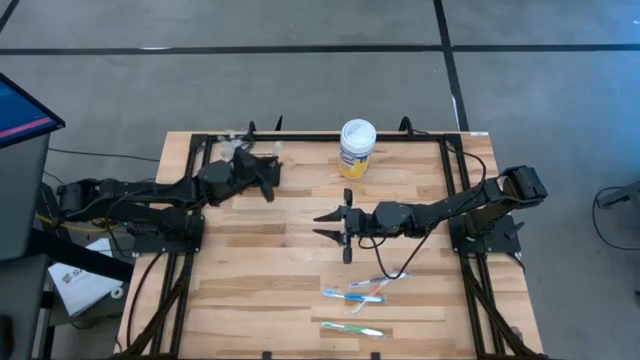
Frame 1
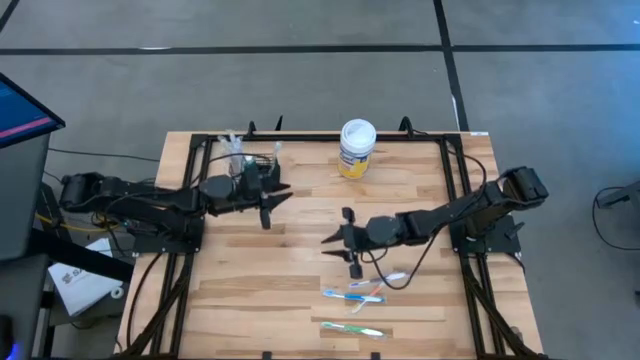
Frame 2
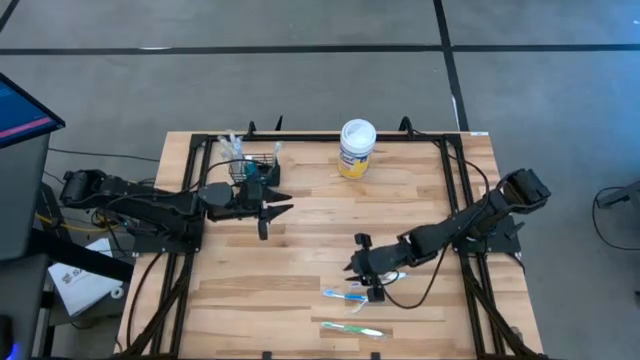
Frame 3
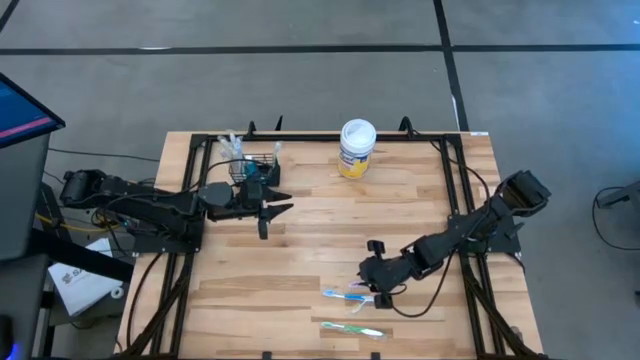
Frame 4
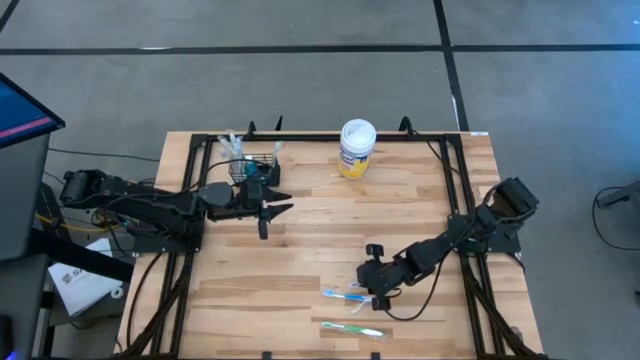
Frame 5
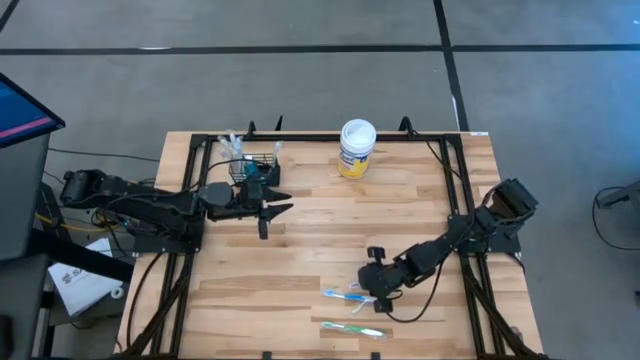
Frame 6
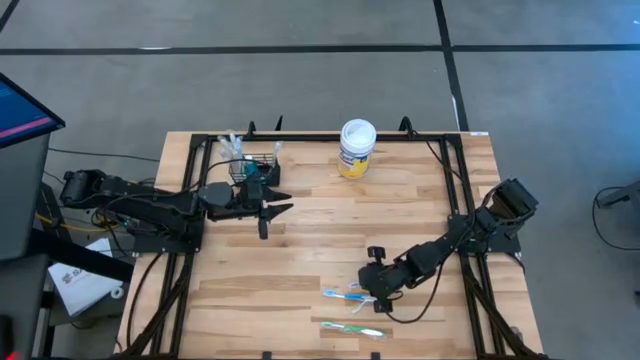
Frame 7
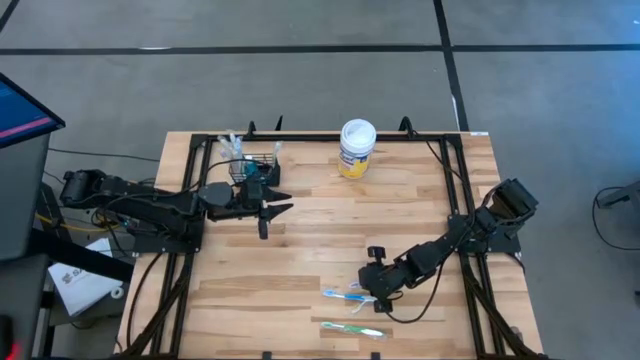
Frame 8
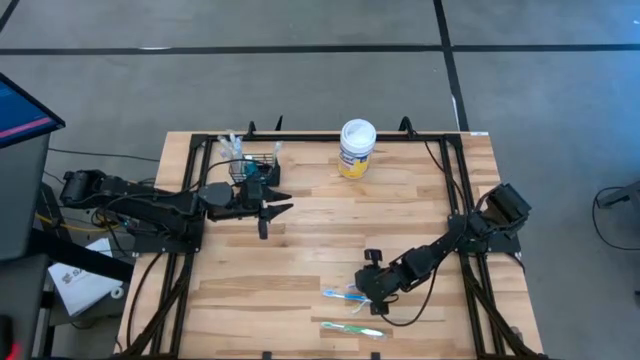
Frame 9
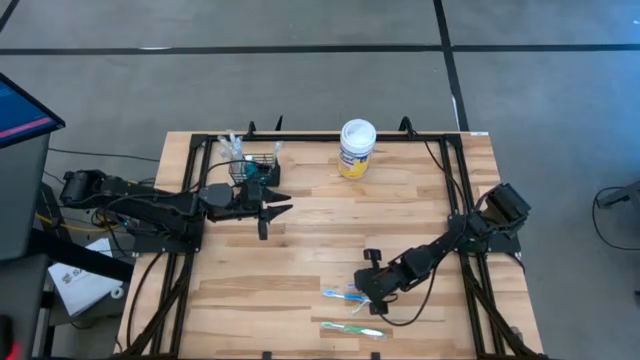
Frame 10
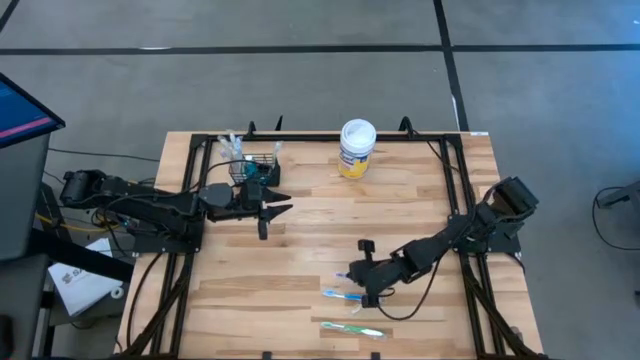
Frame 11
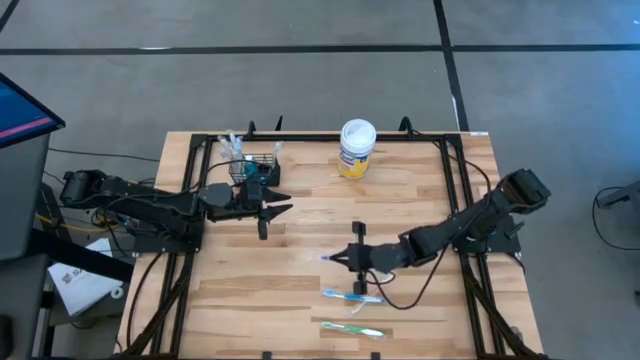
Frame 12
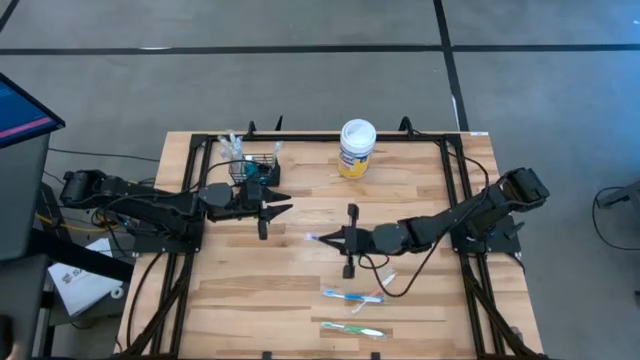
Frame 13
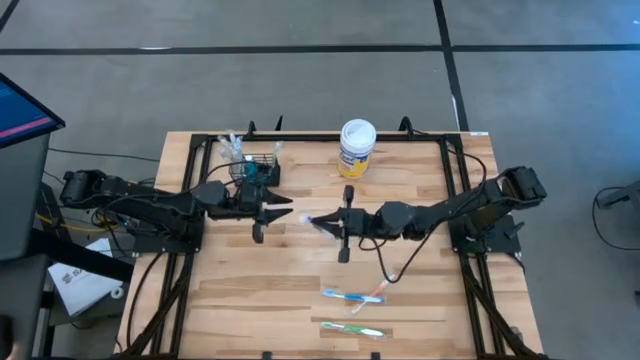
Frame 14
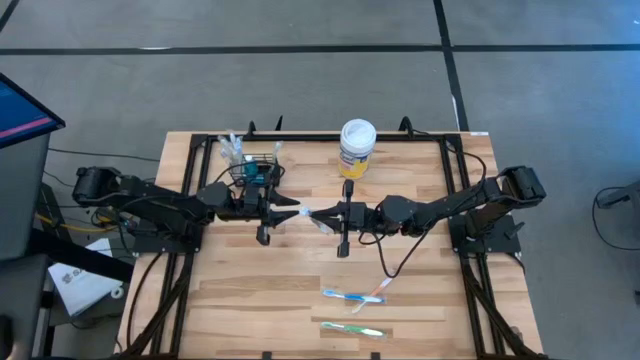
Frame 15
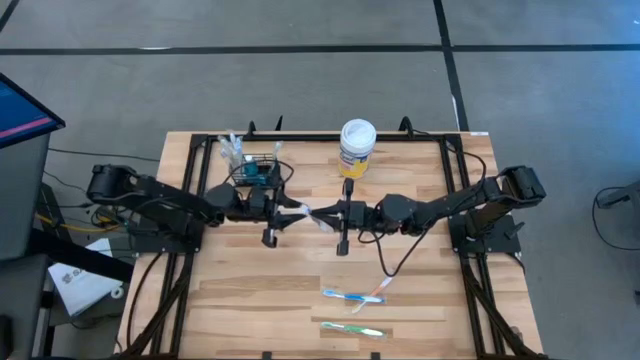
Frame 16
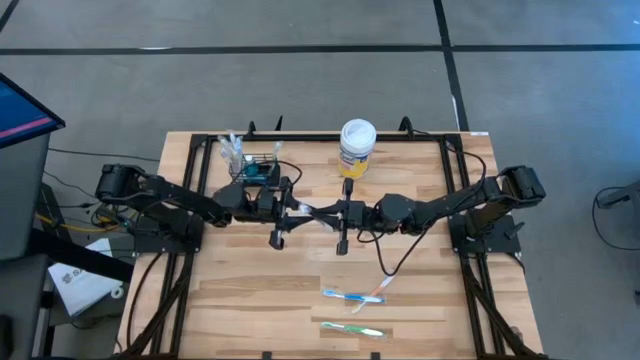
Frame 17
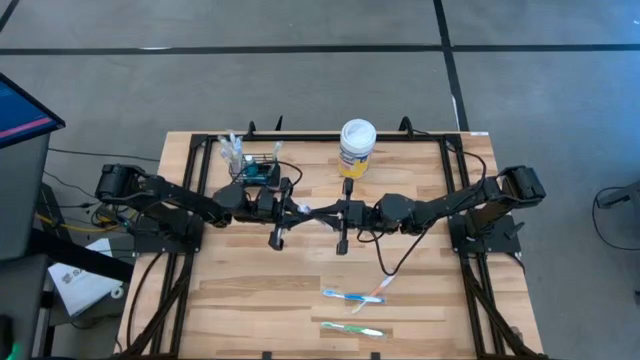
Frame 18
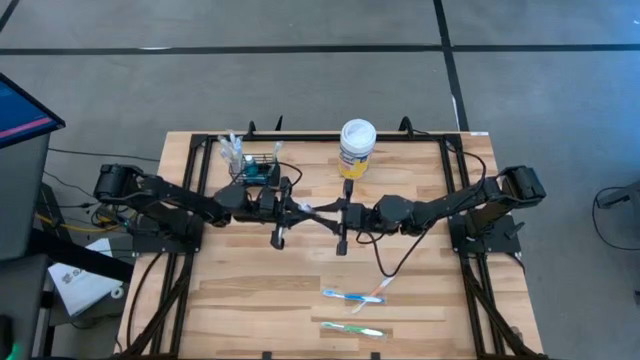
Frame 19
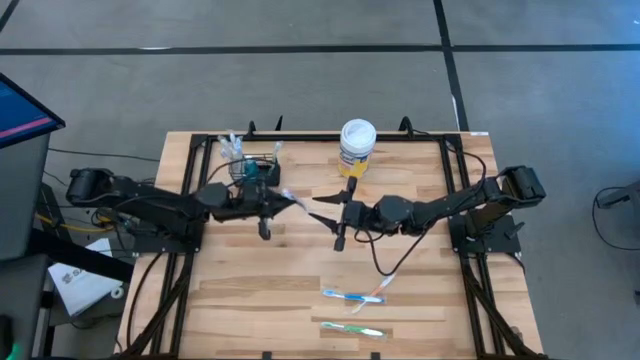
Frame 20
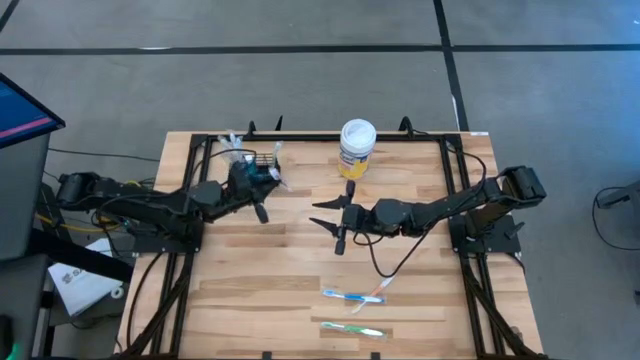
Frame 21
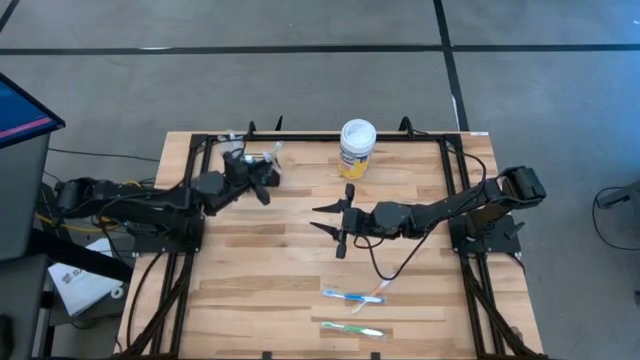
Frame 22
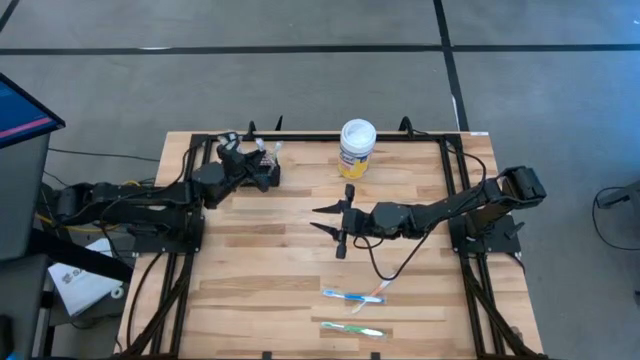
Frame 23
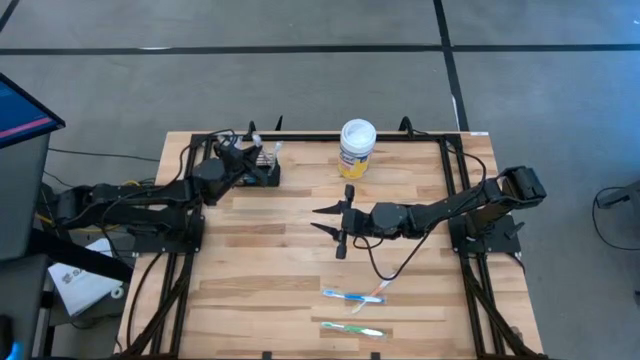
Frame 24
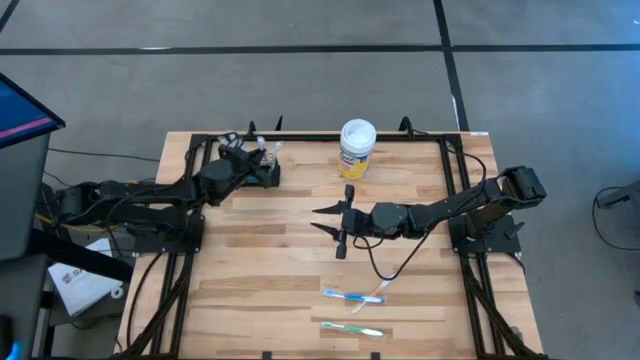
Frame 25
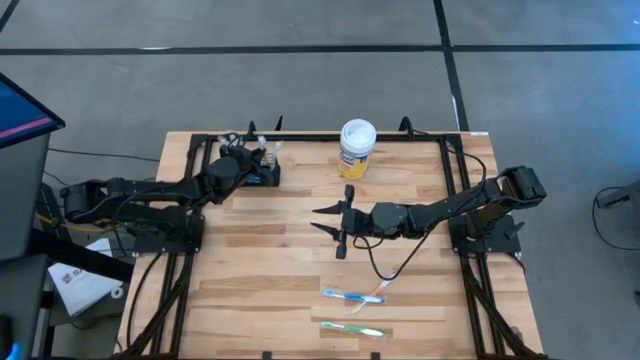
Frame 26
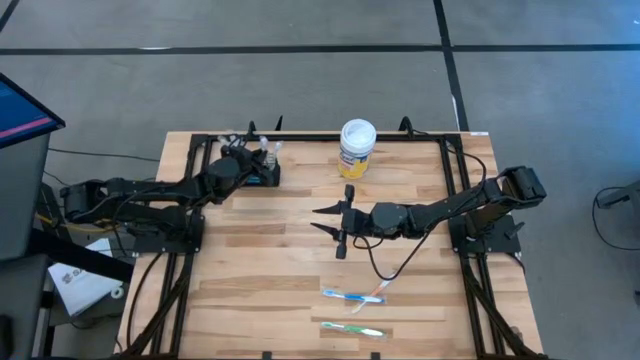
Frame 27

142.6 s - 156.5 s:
Task: Pick & Place toothbrushing station
Put the purple toothbrush into the mesh organizer

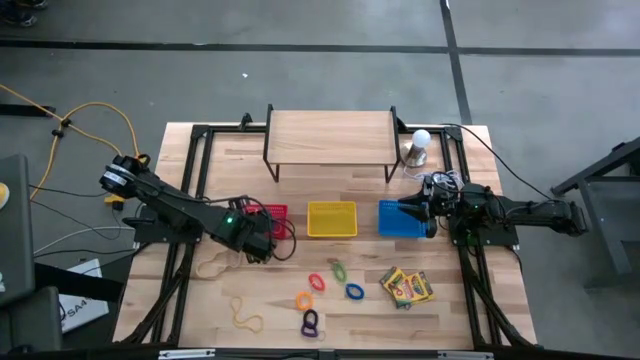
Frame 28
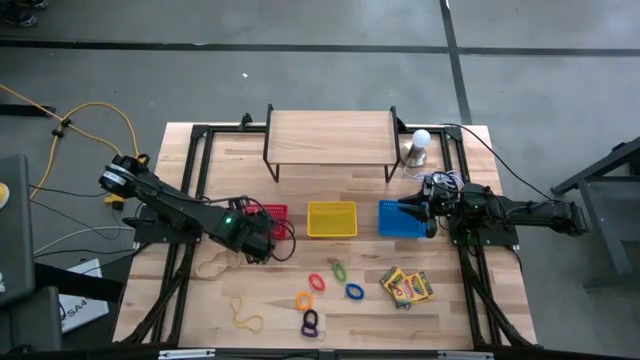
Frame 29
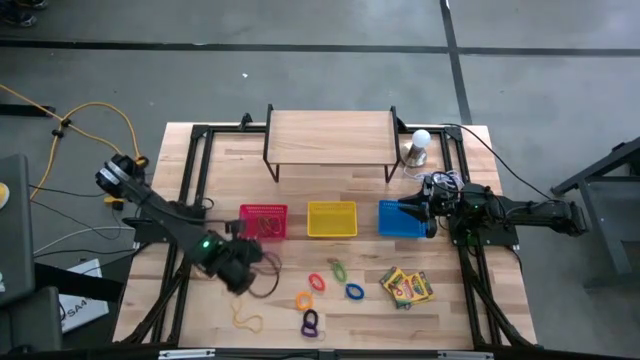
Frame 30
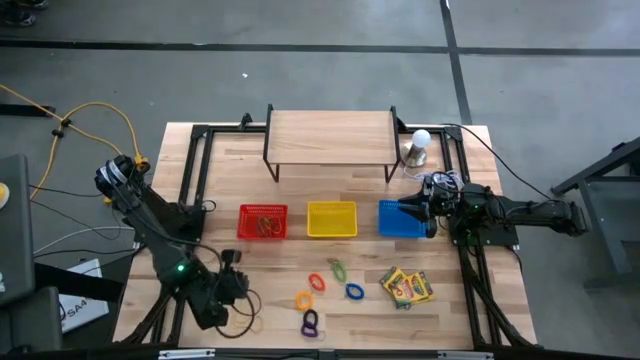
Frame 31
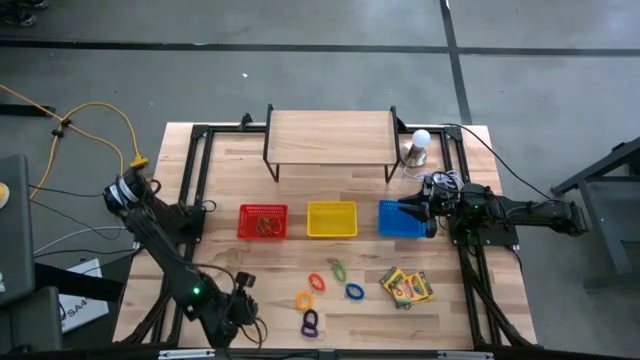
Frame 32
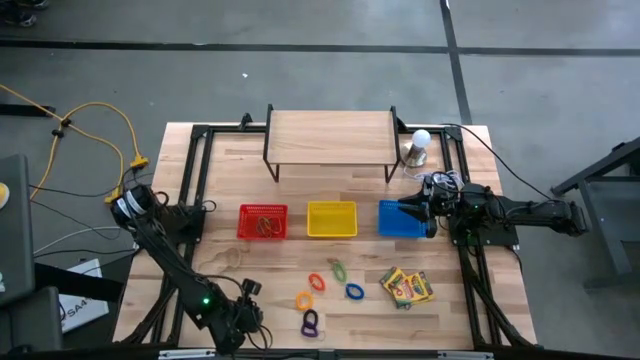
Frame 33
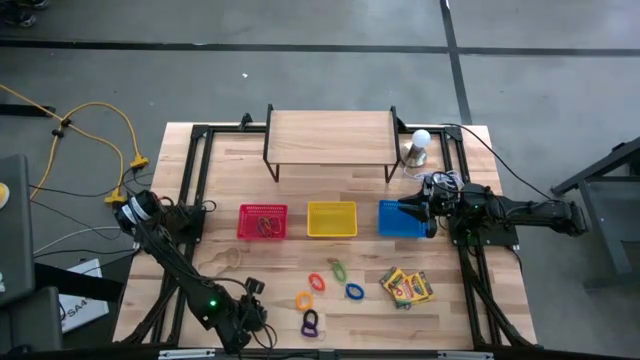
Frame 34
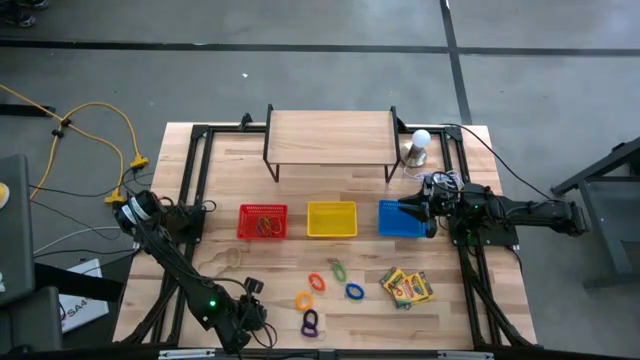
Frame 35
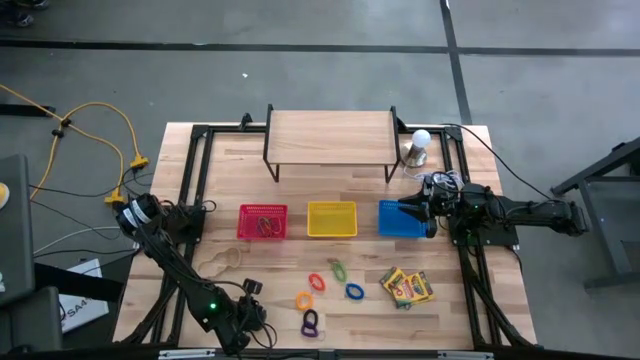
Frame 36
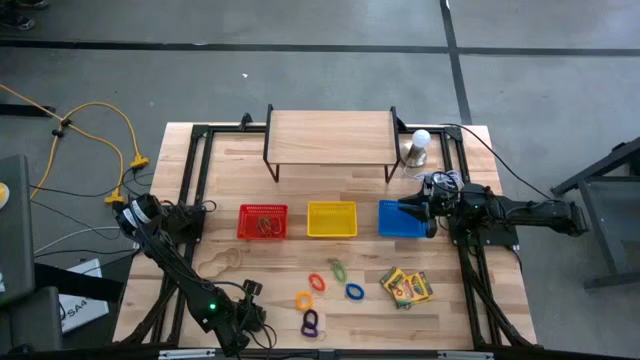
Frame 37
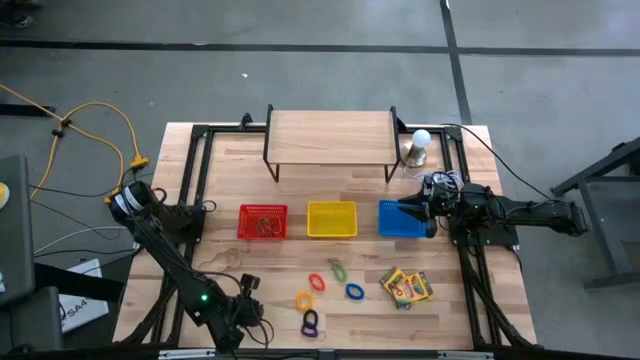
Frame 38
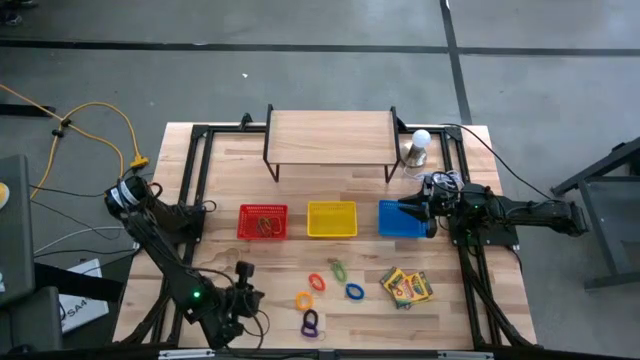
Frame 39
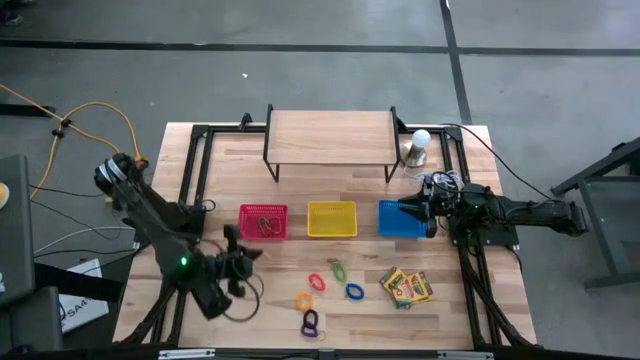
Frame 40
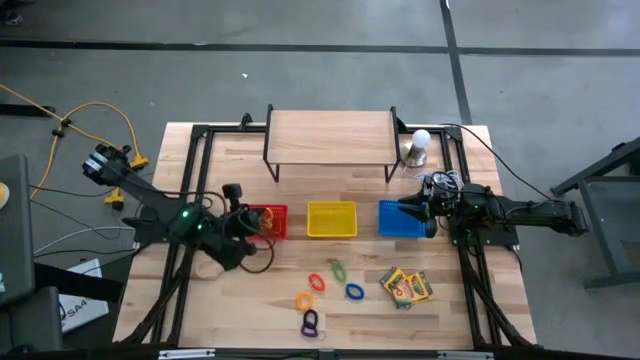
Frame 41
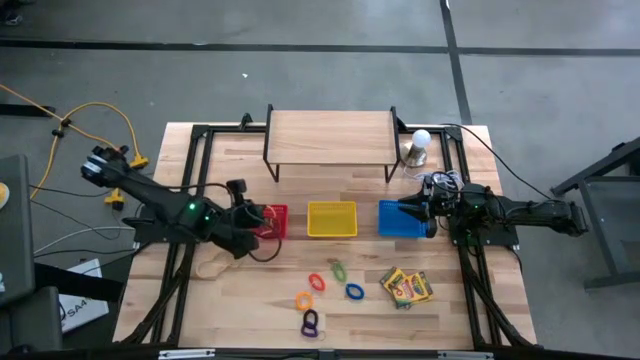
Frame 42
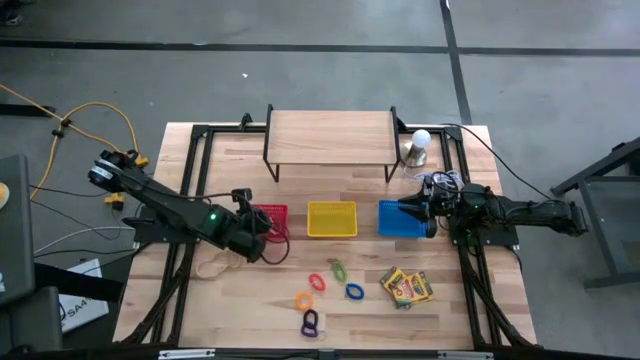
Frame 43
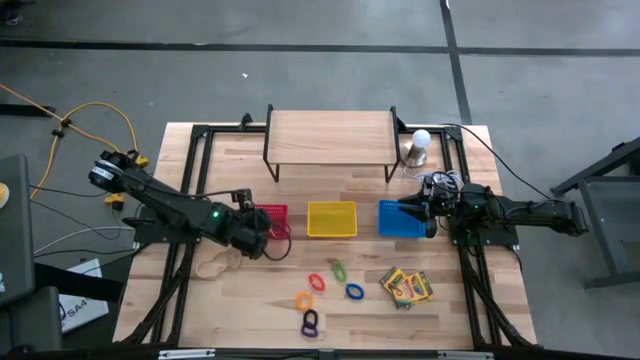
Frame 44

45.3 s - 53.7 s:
Task: Pick & Place Office Desk Supplies
Put the yellow rubber band into the red bin
